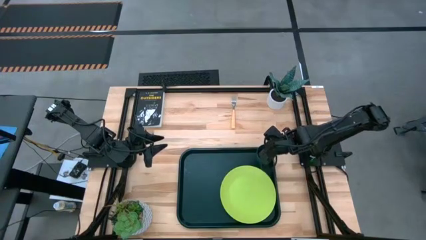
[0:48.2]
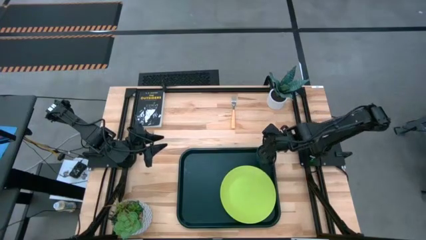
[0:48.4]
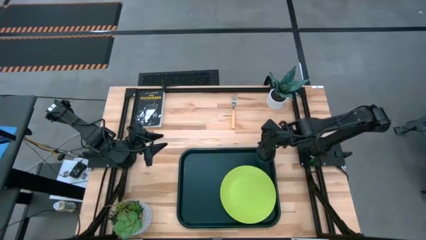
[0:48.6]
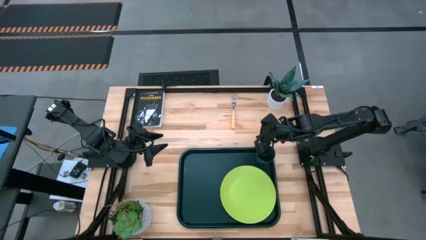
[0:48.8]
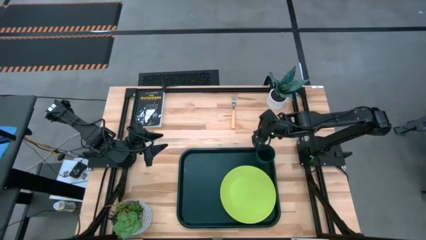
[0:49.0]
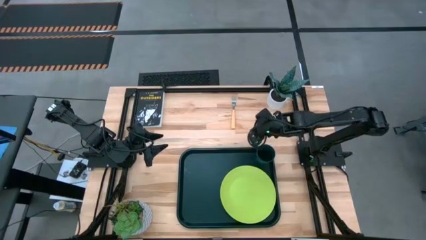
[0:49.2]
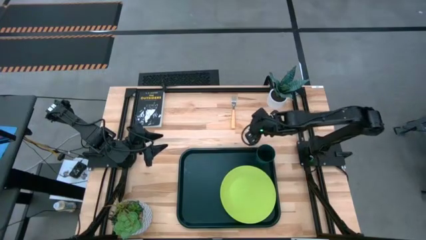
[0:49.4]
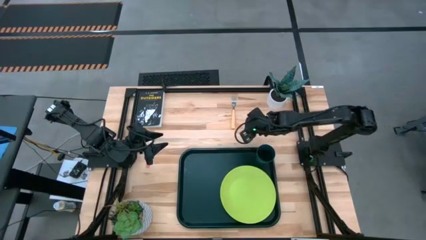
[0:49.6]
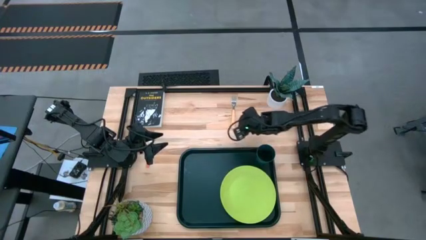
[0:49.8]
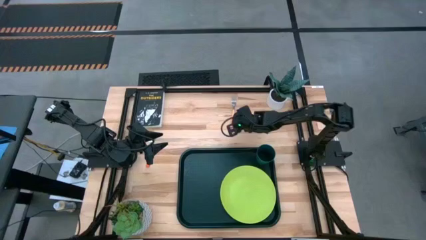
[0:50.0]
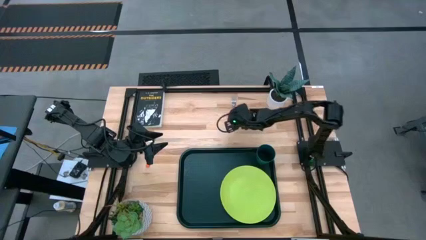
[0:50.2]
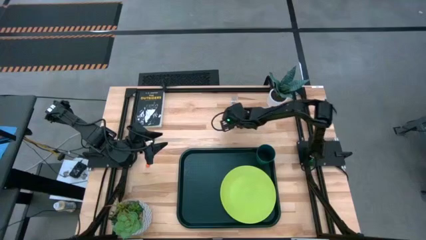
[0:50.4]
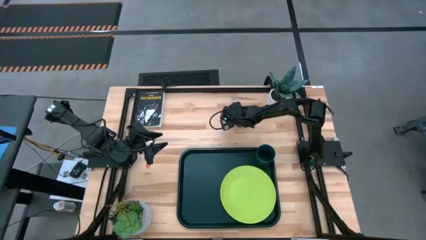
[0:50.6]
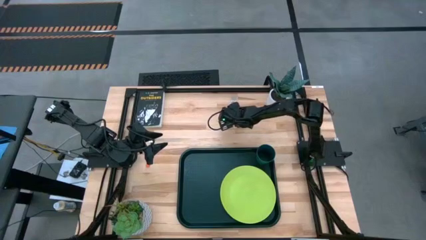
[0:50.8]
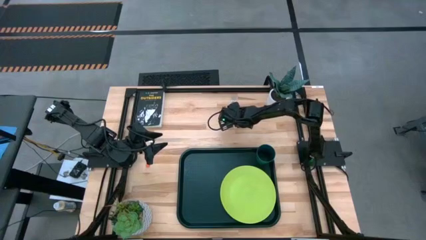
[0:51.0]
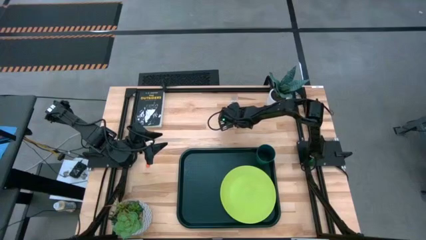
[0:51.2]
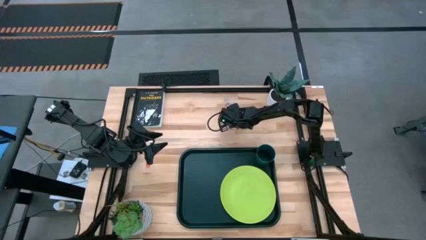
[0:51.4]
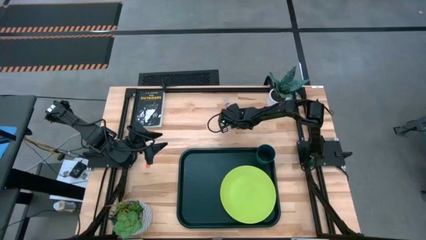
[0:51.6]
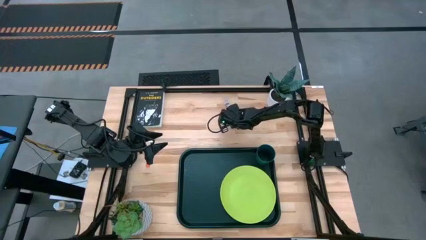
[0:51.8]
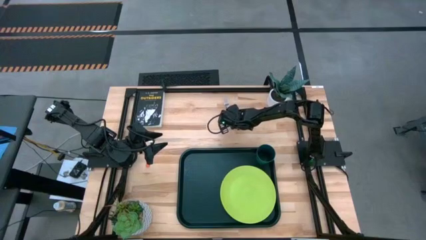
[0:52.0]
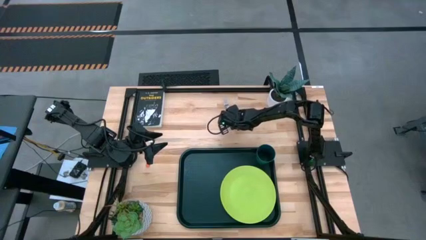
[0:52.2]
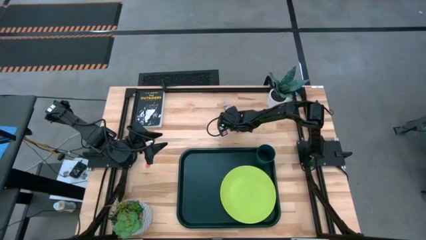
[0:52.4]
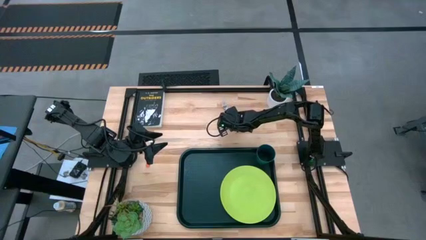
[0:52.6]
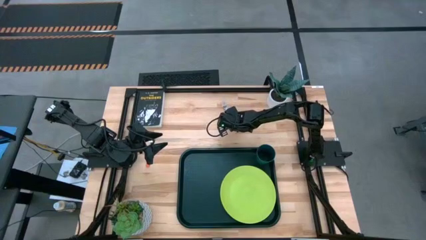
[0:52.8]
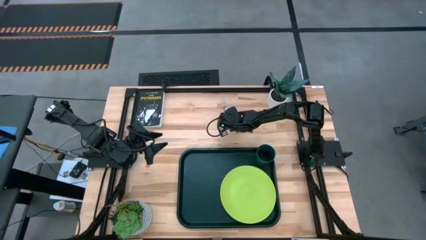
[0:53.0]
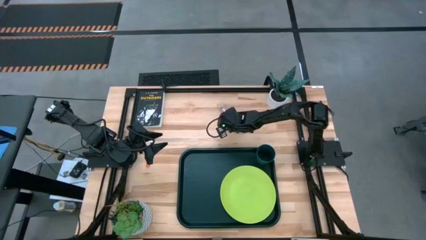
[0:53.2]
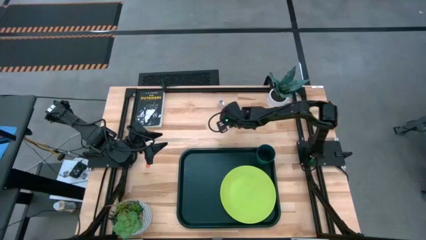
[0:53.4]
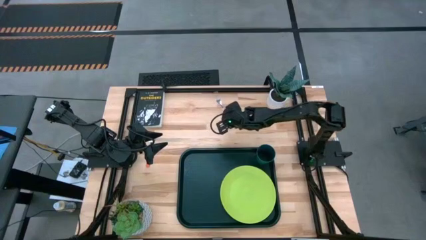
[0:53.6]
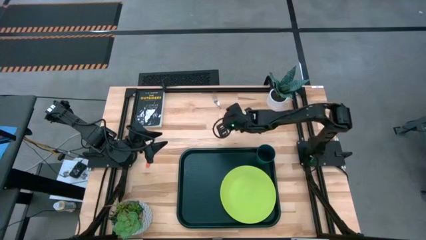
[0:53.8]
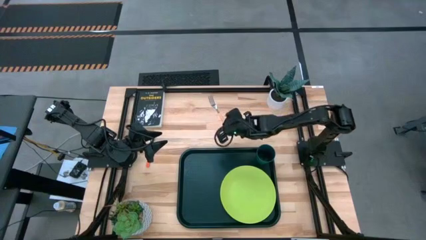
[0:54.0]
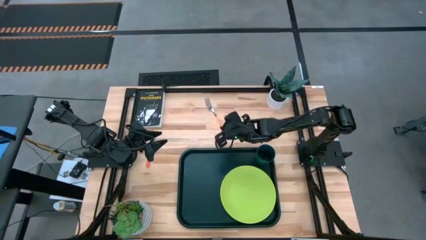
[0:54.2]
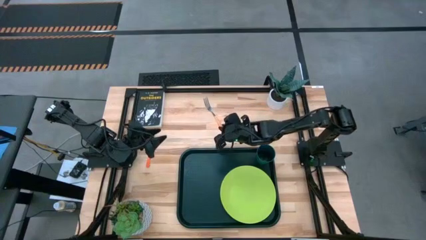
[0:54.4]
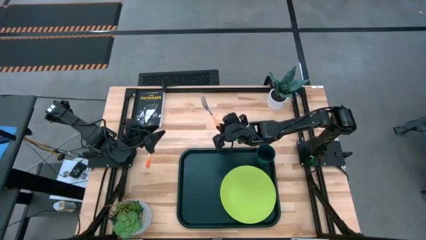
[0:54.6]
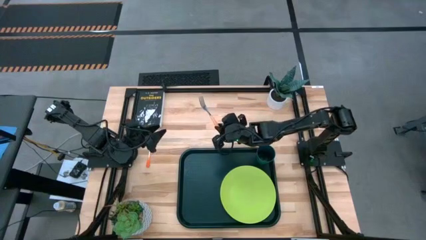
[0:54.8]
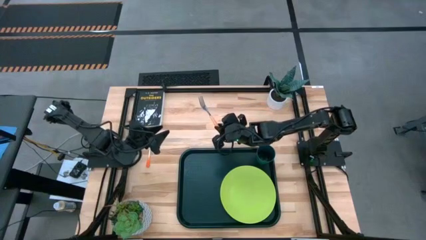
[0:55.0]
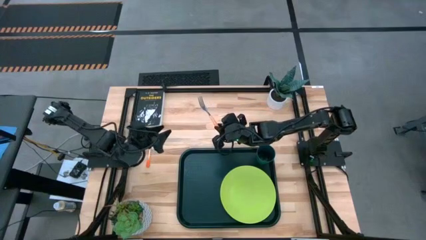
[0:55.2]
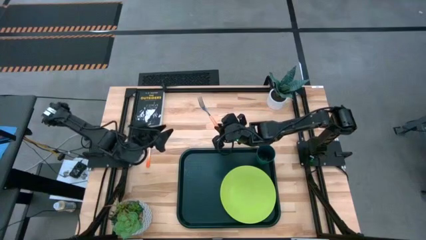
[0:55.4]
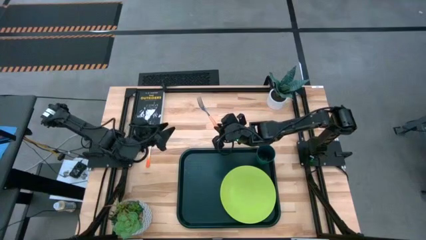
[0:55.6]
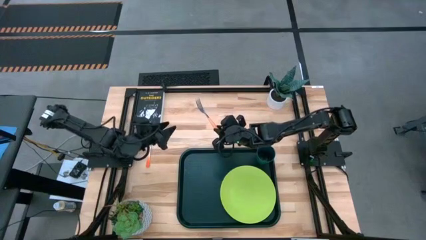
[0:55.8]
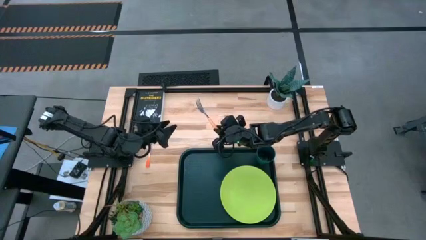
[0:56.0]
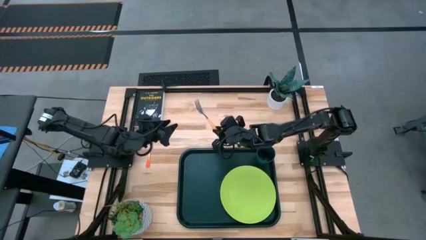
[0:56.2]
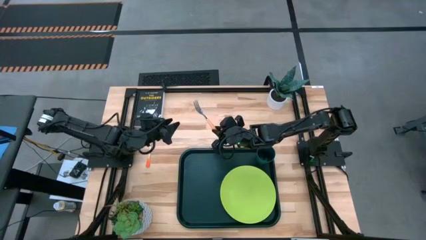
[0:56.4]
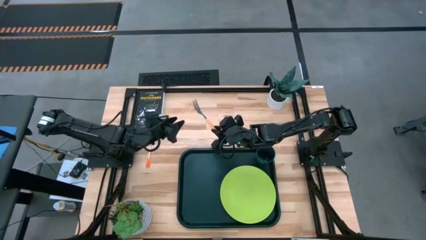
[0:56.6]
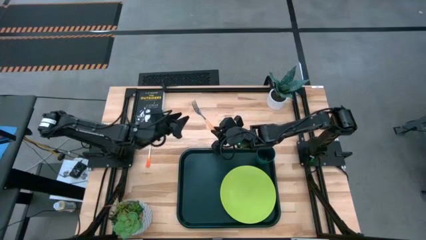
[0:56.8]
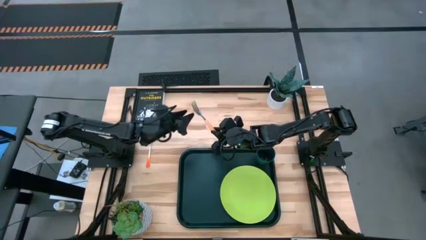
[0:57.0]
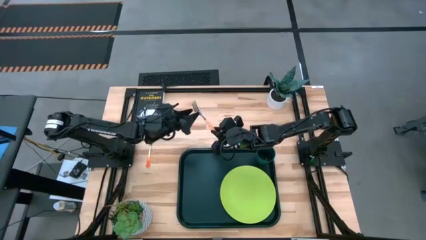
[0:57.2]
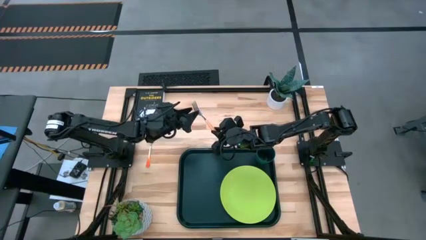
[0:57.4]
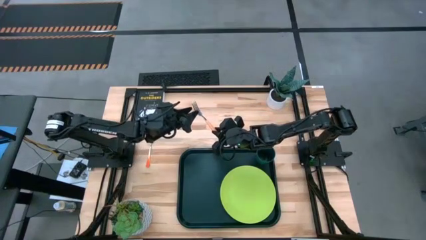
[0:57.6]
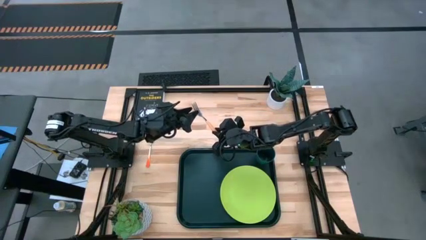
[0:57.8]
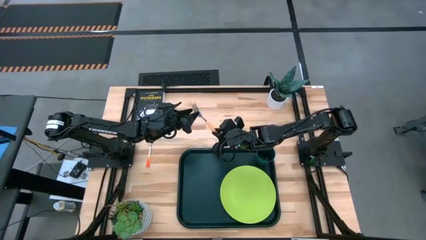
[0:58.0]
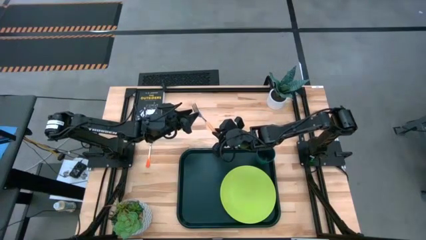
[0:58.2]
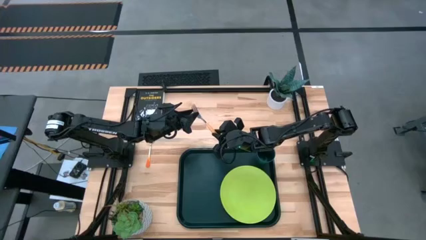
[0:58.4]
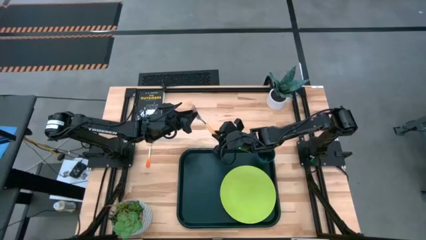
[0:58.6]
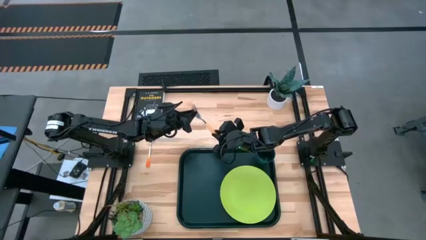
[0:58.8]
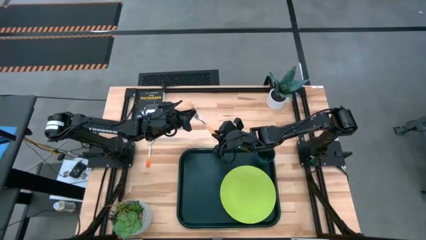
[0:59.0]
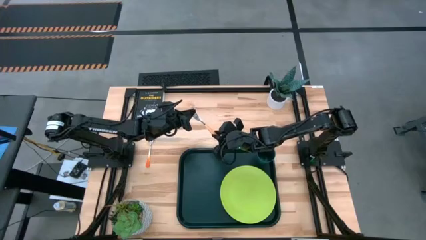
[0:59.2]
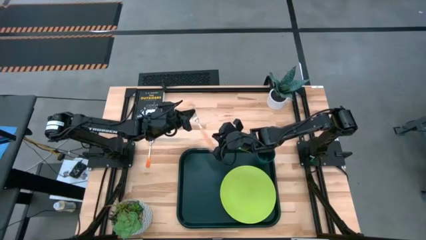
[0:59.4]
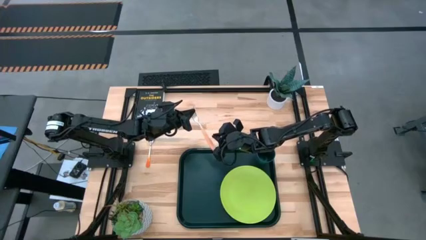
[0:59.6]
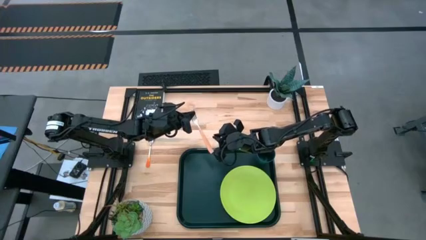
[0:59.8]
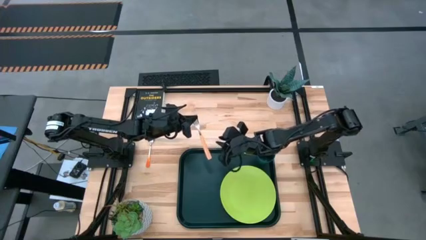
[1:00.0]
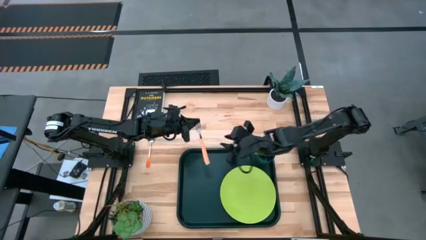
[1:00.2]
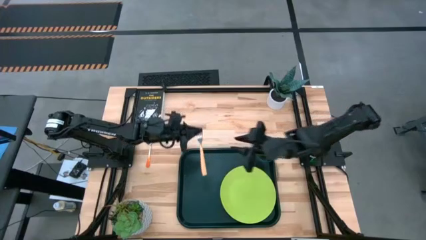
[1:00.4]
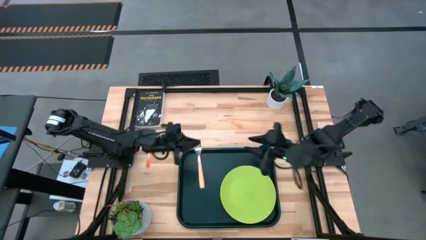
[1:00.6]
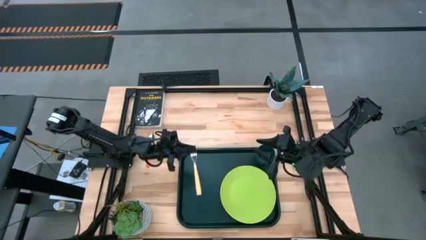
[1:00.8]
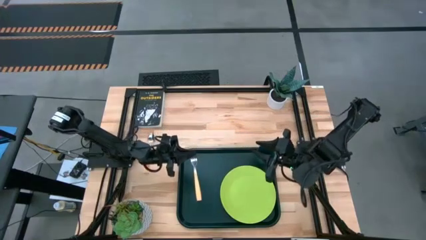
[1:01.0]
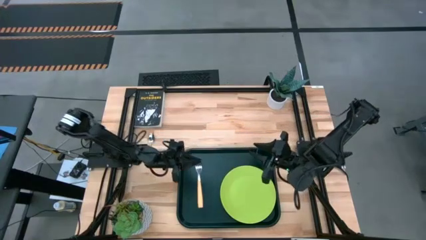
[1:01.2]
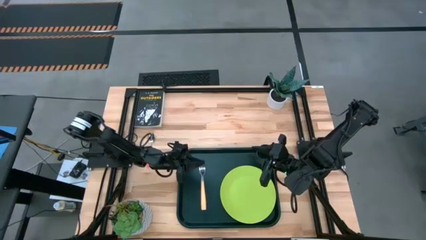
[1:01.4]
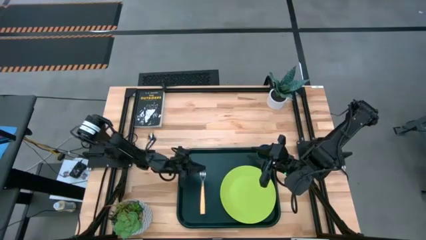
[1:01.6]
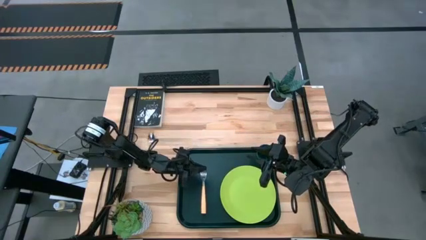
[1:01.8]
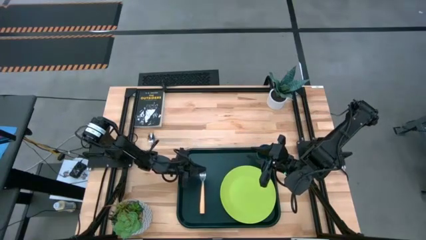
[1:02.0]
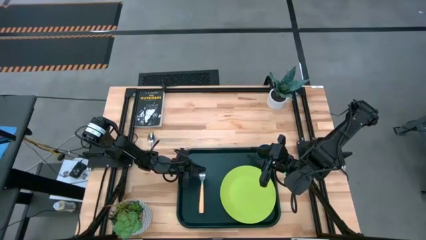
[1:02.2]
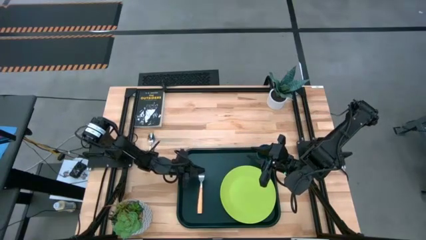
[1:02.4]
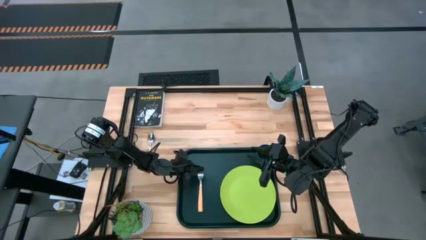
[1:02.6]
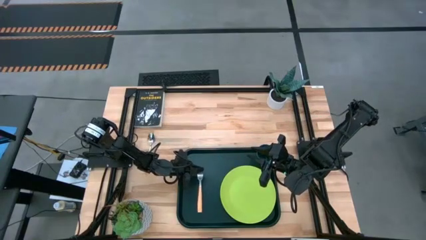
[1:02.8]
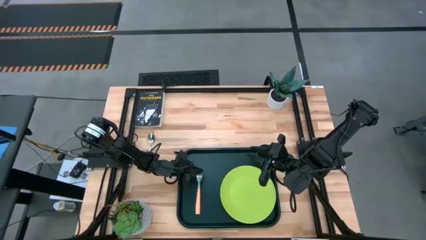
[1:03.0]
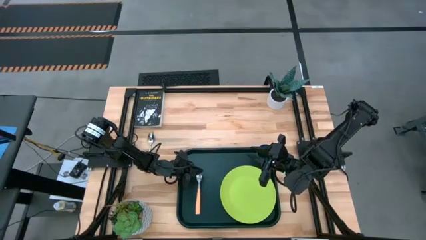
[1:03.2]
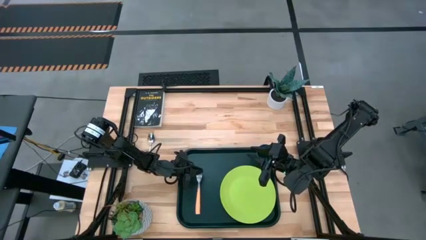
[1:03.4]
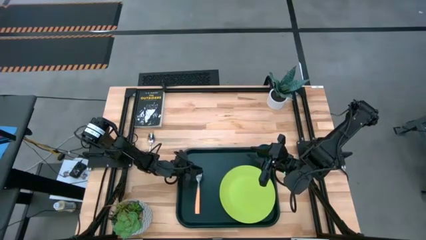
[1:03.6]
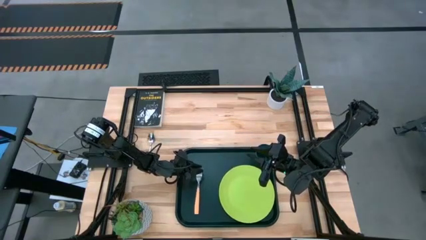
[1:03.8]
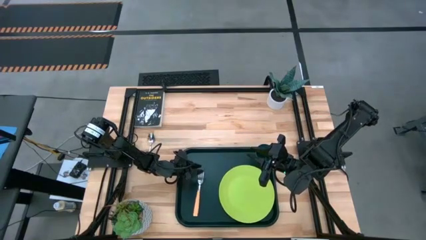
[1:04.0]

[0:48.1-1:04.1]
Task: Pick and place plate/cup/fork/spoon on tray
Put the light orange fork on the black serving tray to the left of the light green plate
